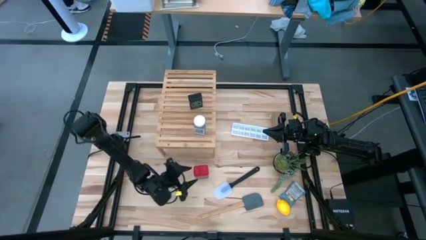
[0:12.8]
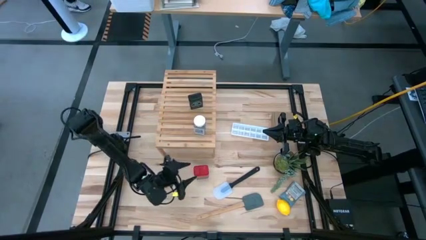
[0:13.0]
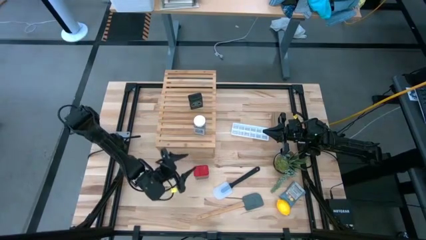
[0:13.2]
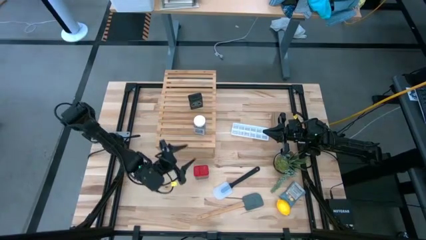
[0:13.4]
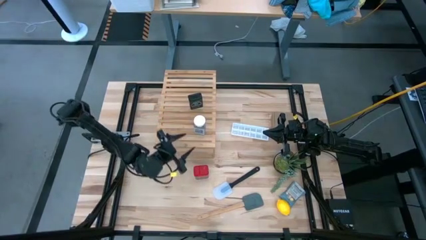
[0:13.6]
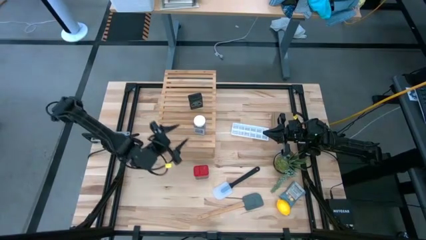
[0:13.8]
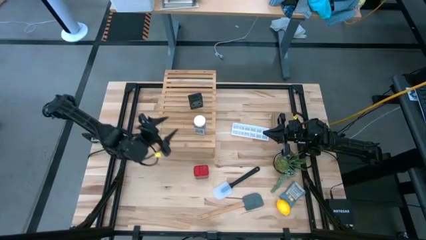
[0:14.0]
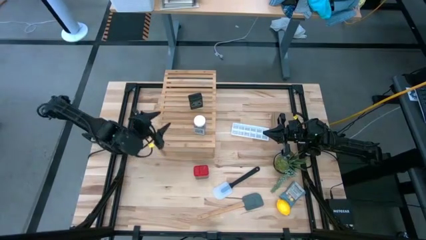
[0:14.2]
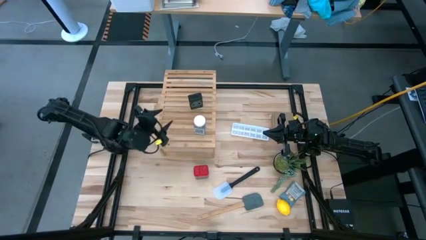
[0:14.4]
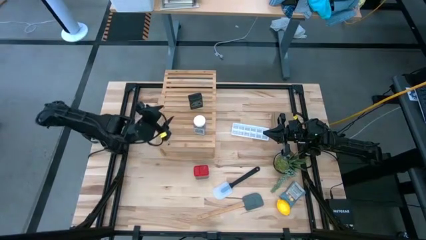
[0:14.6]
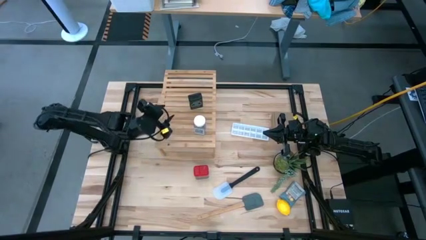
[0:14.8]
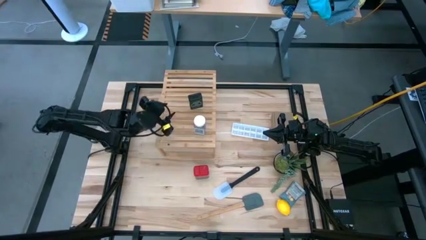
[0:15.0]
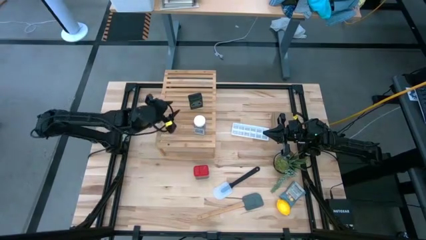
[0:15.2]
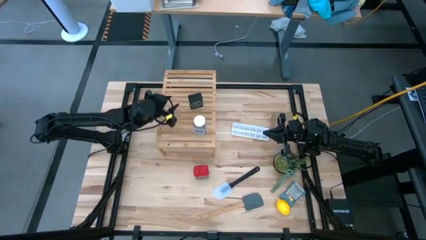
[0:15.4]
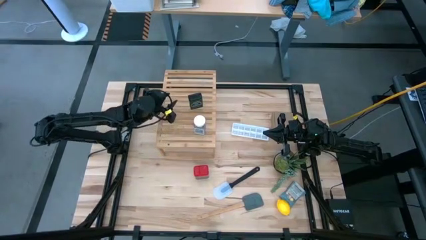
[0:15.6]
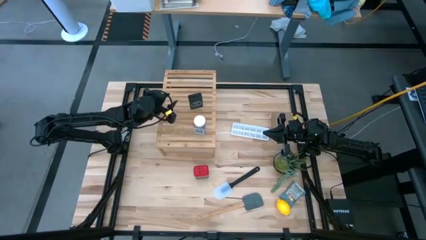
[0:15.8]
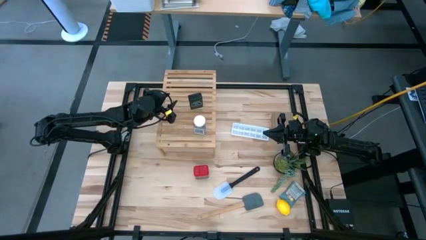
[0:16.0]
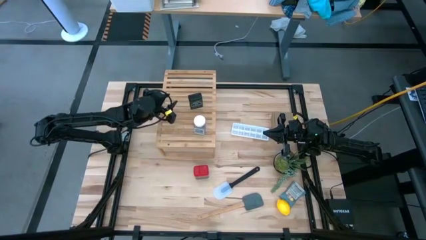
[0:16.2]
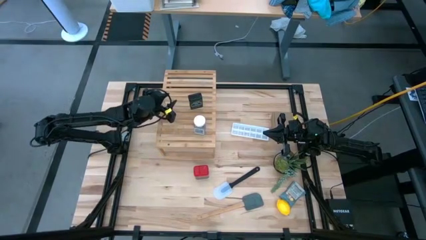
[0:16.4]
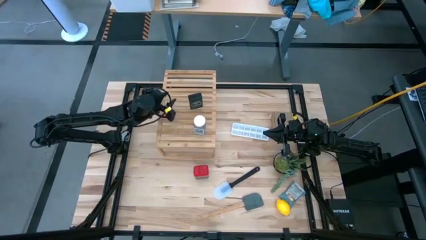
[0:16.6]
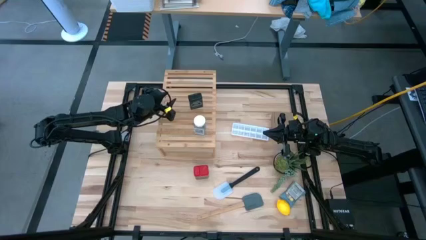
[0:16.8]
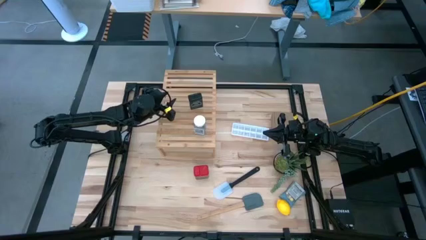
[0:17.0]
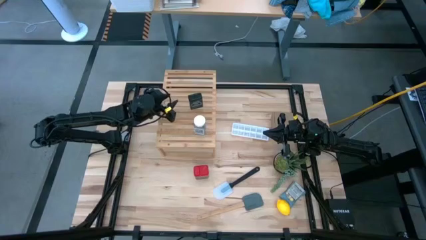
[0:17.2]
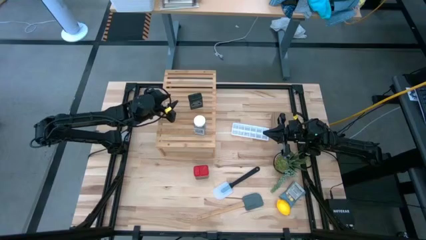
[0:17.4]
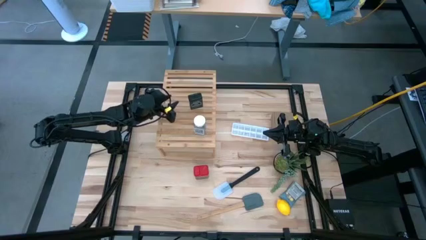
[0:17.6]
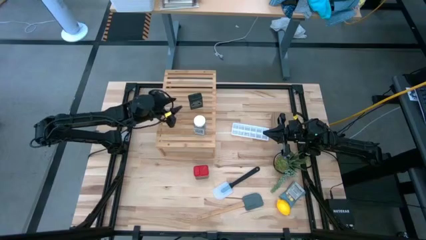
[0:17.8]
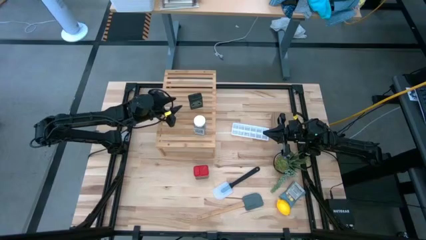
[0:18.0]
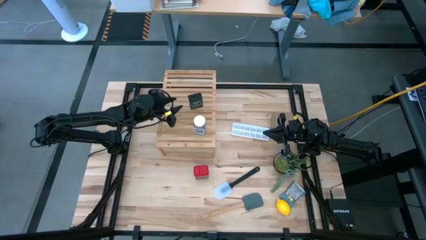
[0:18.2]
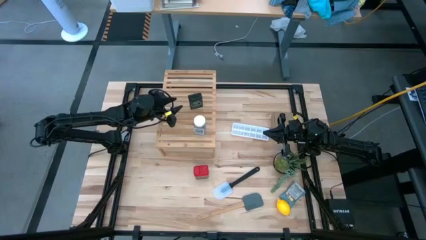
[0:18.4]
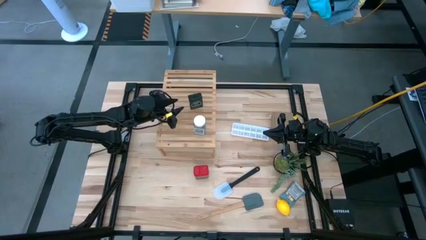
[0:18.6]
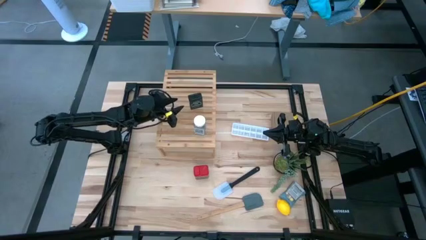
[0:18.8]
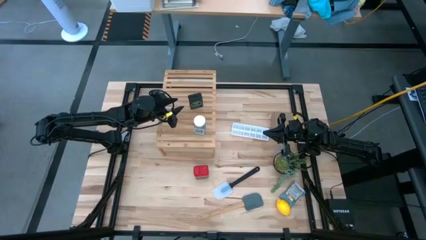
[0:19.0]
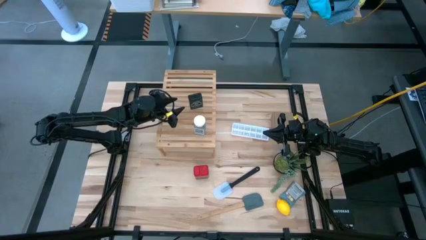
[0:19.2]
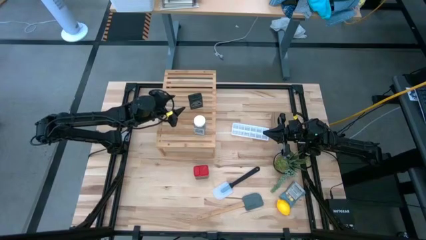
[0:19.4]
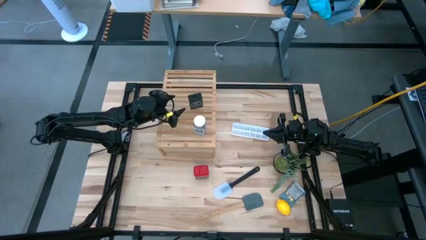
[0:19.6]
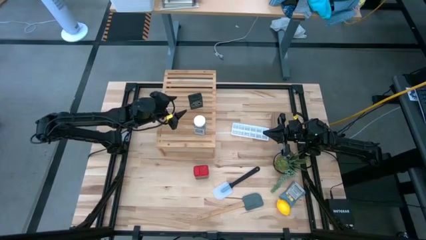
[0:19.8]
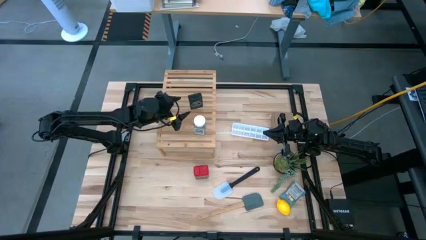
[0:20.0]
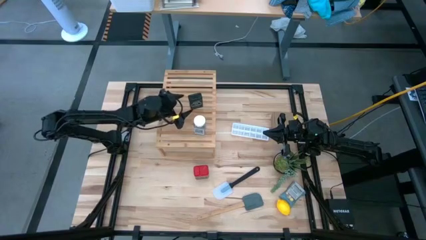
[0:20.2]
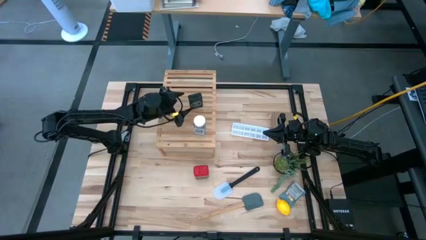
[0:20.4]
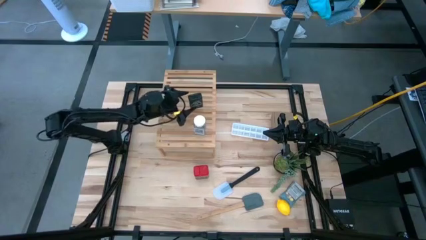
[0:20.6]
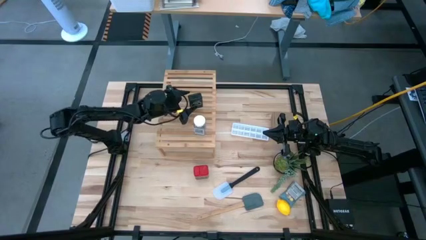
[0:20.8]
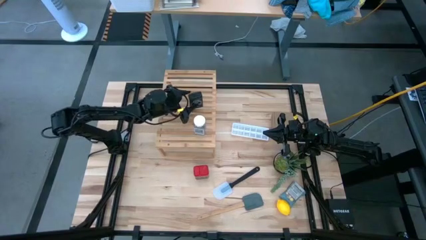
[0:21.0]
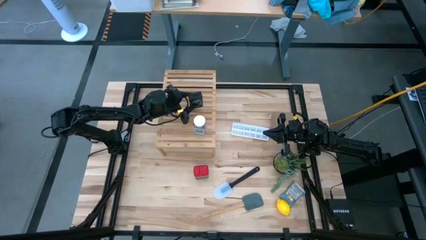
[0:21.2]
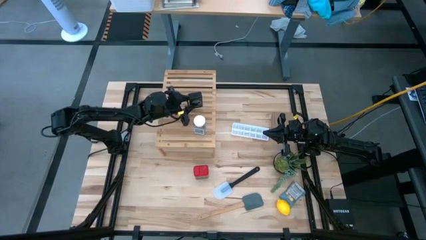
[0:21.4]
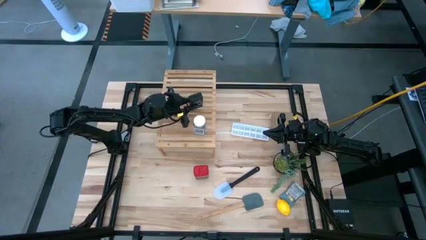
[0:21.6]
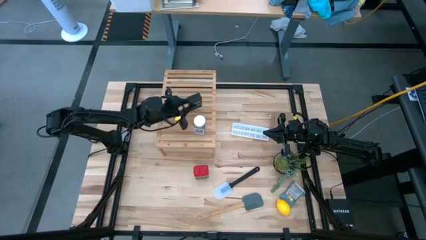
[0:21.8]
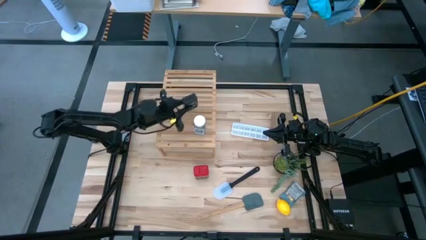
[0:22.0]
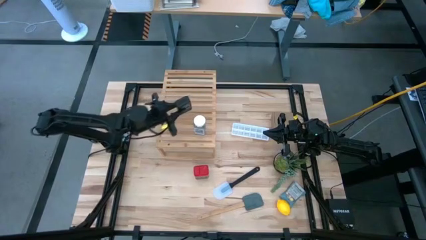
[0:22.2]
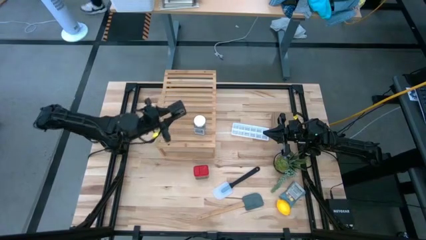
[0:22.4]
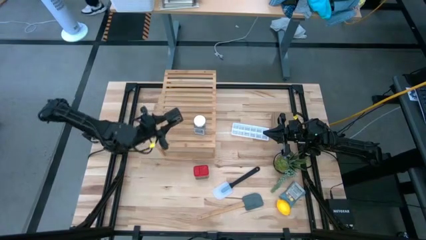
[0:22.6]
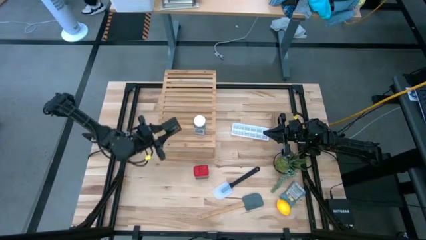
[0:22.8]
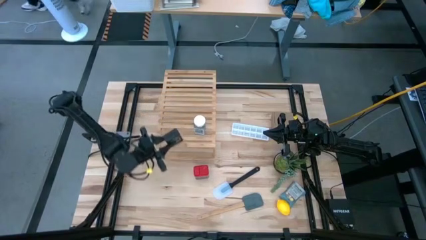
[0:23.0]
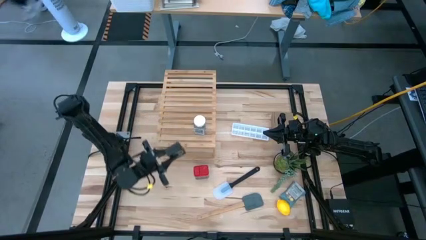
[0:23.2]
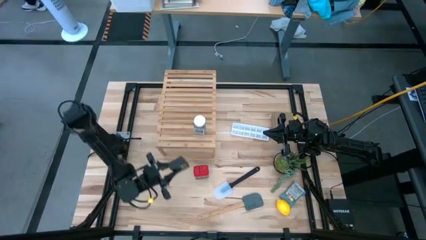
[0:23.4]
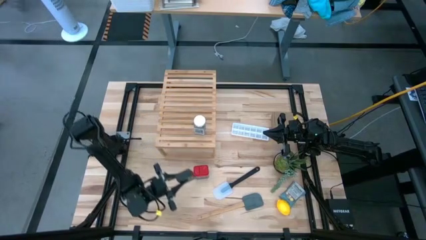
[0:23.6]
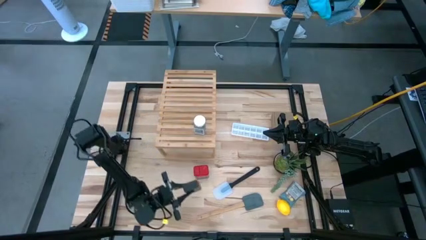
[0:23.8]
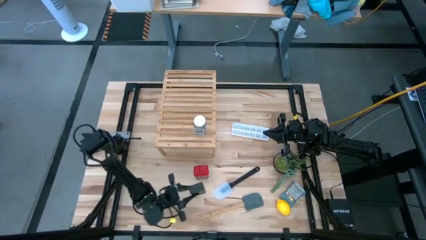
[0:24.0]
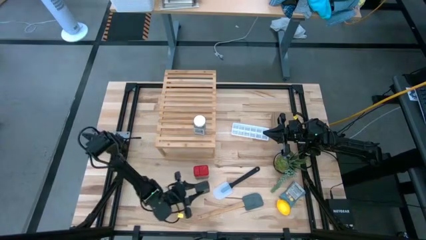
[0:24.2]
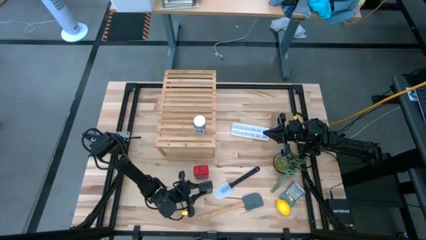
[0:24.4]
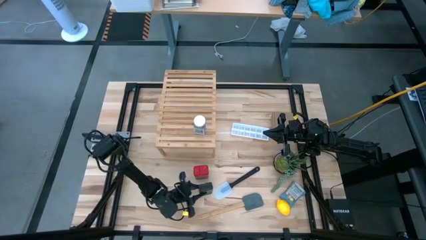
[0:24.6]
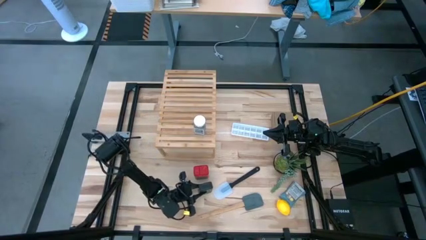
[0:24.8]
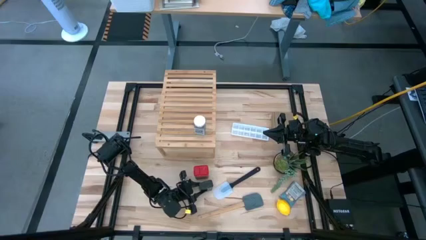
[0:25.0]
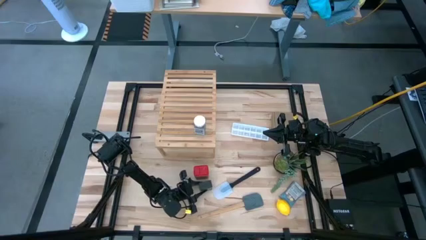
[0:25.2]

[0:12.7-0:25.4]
Task: Shelf spices
Remove the black seasoning can from the shelf
